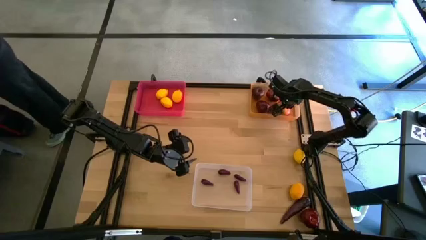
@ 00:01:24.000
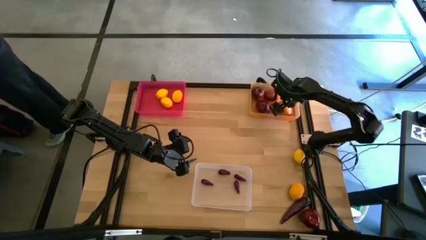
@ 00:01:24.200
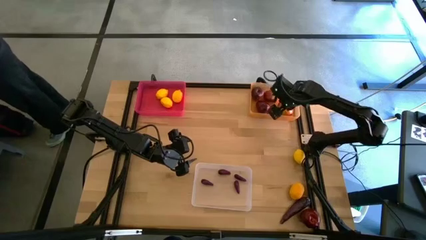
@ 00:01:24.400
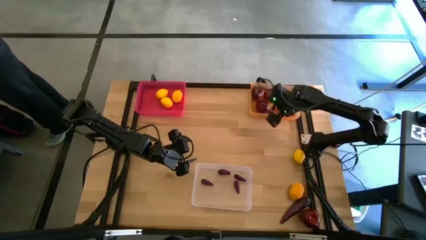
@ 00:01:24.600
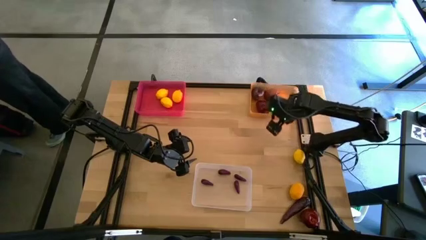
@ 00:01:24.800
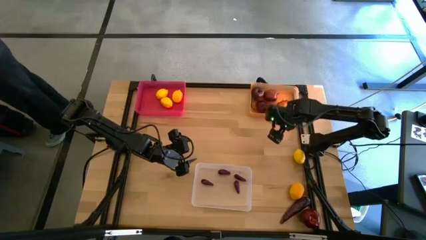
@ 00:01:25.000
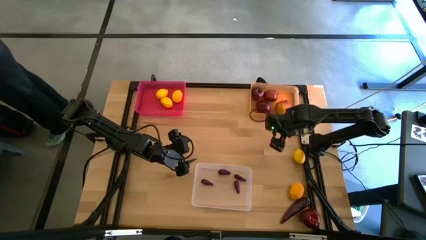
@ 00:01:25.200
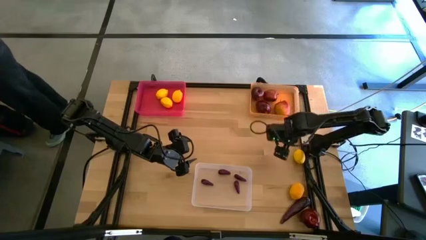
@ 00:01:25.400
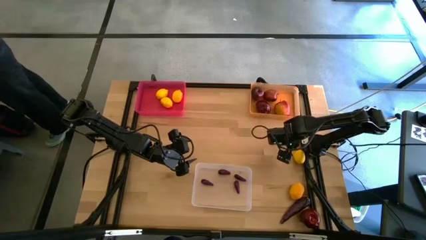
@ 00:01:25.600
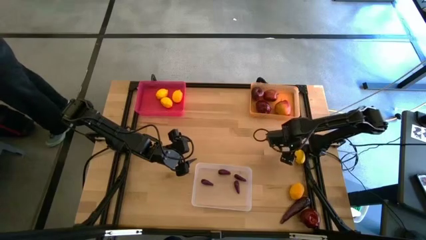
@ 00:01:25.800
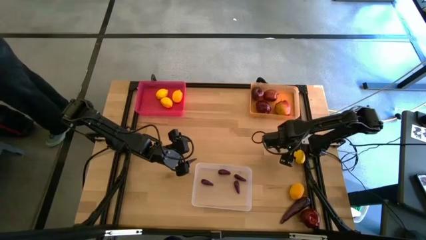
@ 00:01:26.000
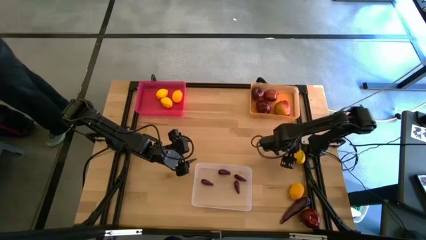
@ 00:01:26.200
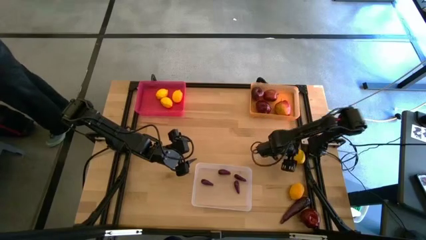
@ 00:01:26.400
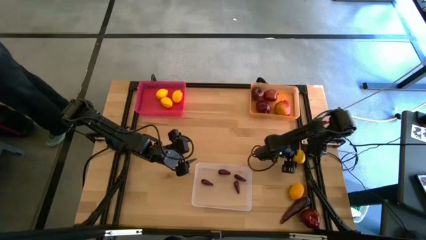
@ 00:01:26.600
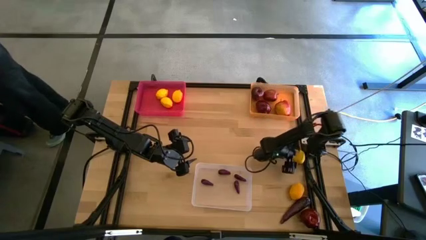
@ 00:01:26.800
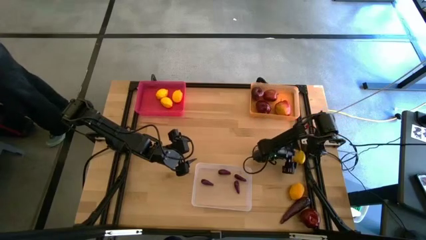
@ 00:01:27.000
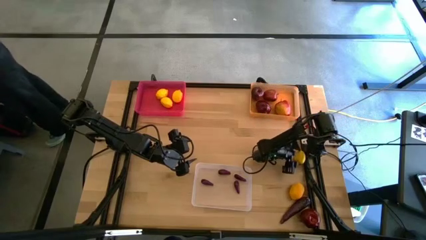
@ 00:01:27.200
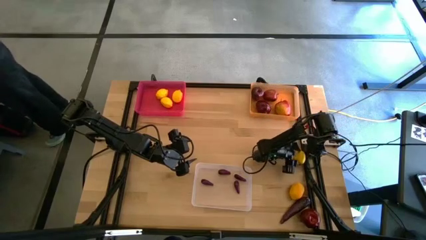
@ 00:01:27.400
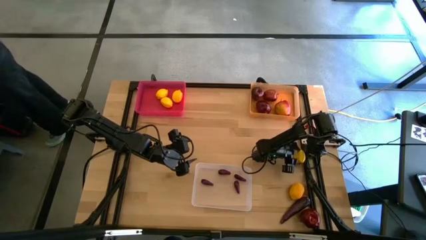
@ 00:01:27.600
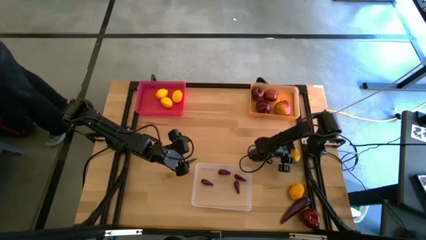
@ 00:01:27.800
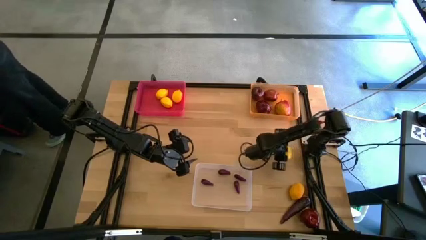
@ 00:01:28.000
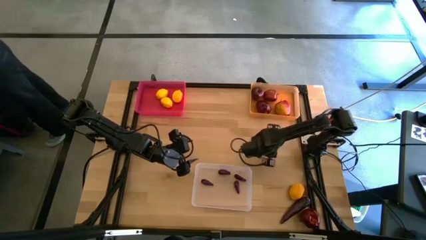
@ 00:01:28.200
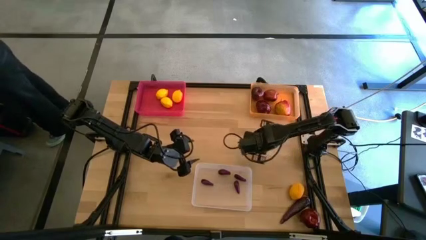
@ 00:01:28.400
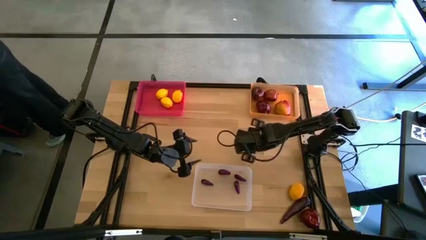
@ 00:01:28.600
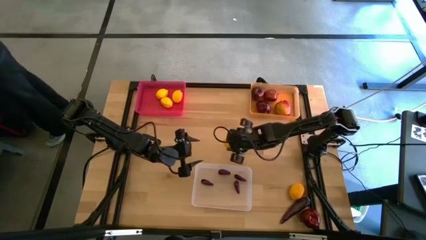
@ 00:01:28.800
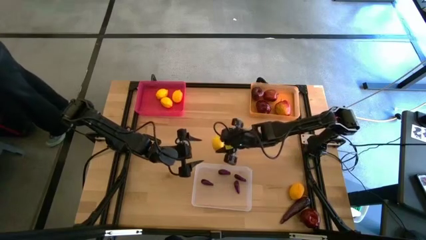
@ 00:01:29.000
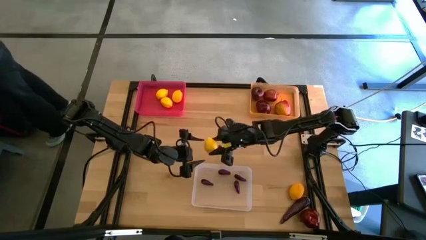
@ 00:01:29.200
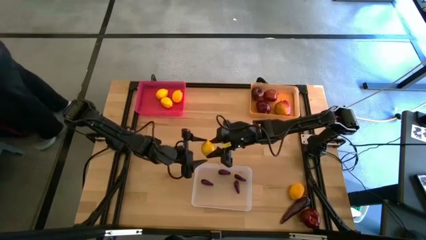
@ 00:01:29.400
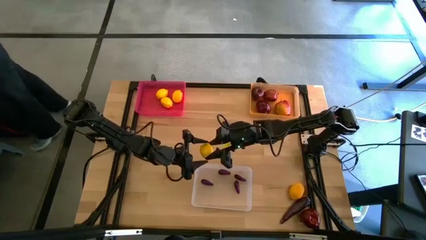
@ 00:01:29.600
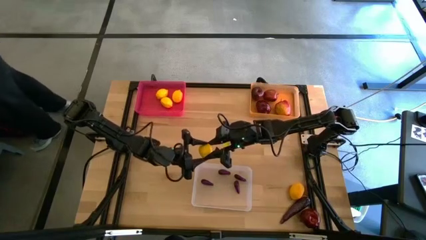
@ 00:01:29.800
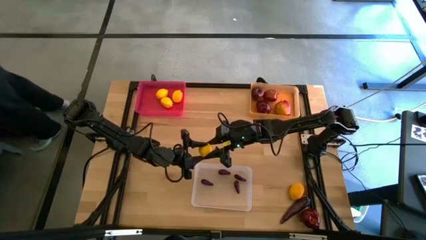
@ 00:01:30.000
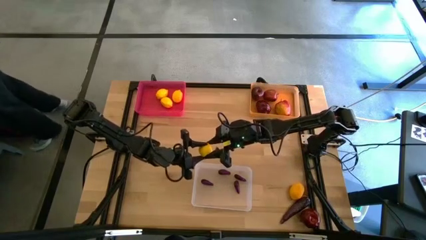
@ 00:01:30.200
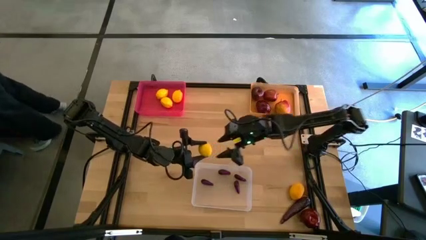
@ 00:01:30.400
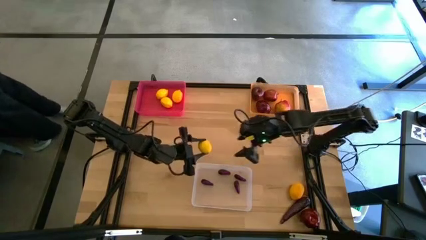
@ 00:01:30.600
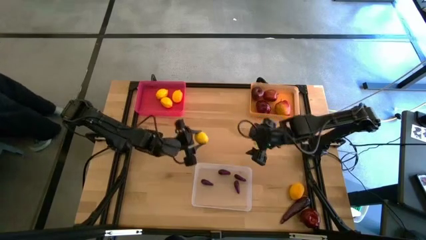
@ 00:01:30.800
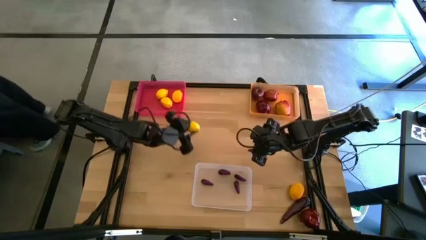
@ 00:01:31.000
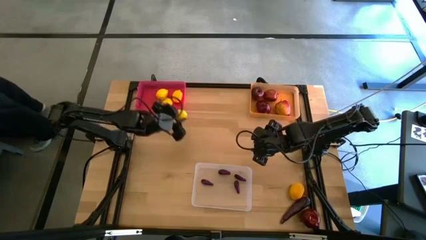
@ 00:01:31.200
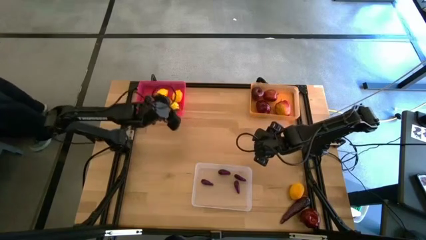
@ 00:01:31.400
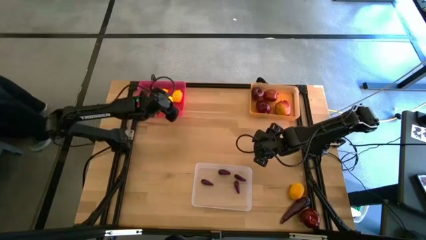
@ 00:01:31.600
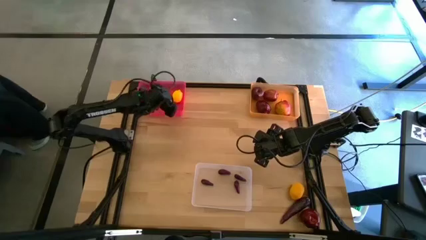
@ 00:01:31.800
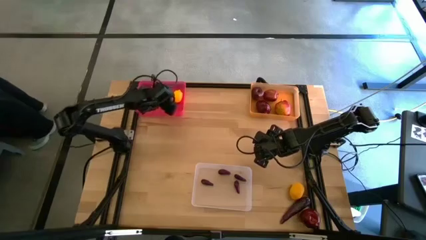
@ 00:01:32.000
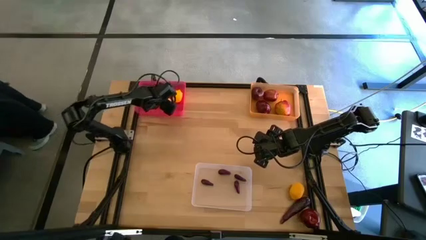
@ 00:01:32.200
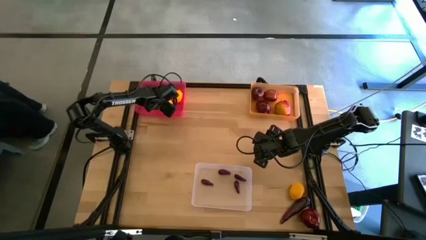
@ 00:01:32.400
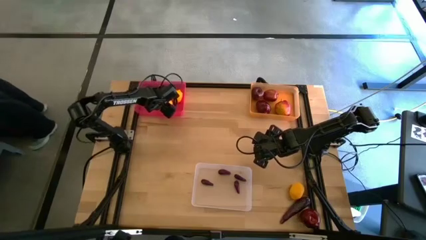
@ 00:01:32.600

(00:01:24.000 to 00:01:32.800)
Task: Sort produce into baskets
Put the lemon into the red bin

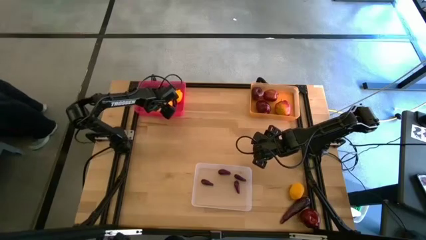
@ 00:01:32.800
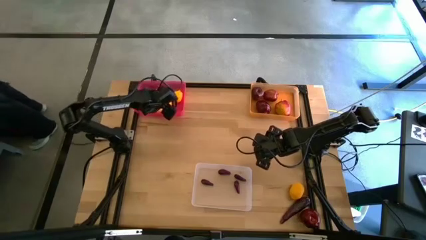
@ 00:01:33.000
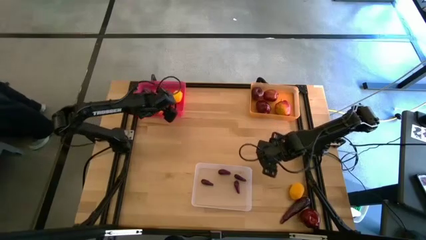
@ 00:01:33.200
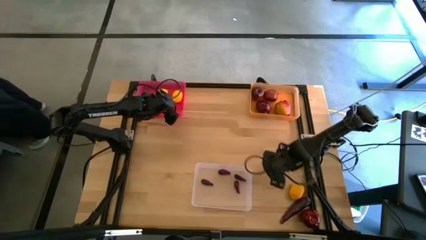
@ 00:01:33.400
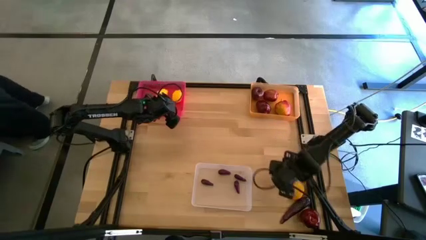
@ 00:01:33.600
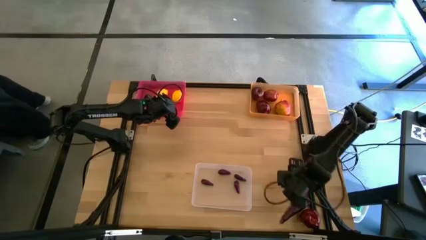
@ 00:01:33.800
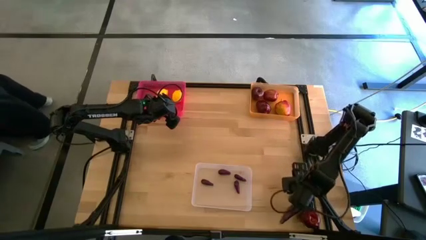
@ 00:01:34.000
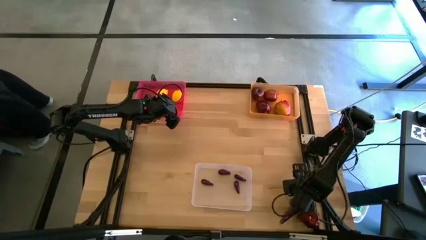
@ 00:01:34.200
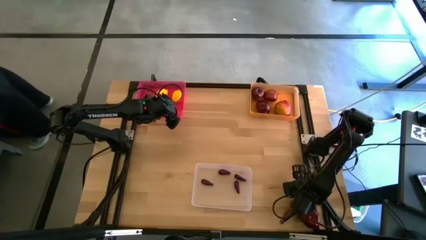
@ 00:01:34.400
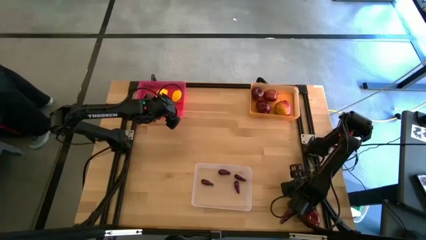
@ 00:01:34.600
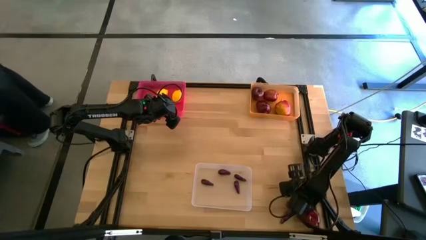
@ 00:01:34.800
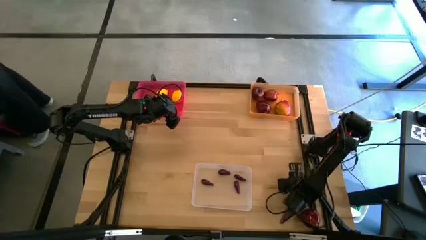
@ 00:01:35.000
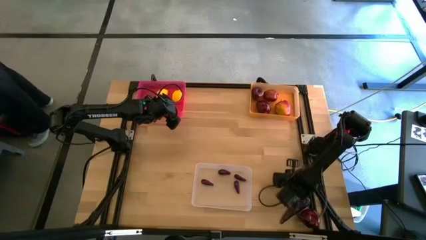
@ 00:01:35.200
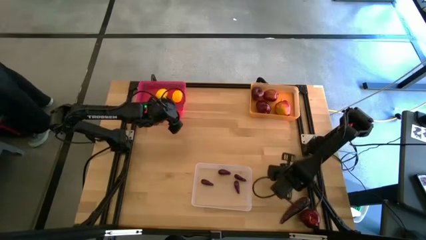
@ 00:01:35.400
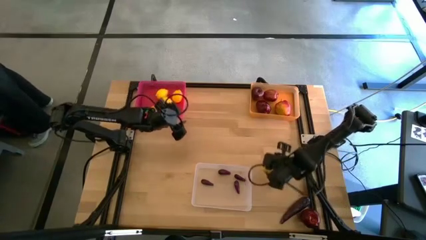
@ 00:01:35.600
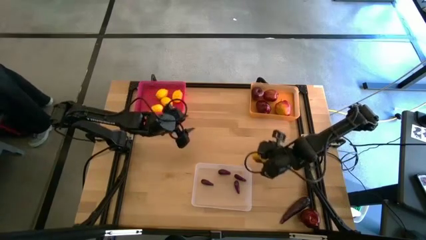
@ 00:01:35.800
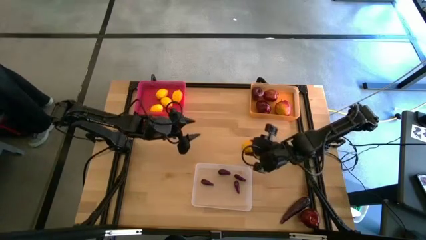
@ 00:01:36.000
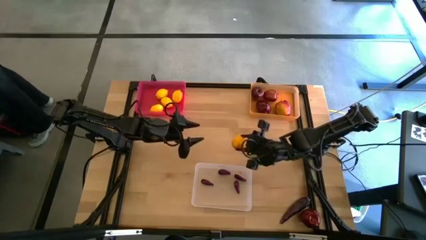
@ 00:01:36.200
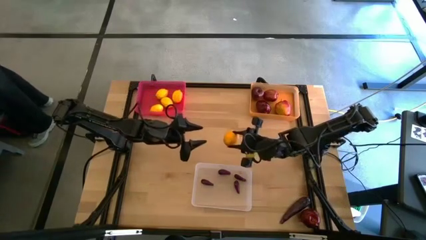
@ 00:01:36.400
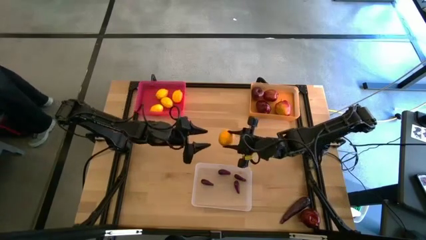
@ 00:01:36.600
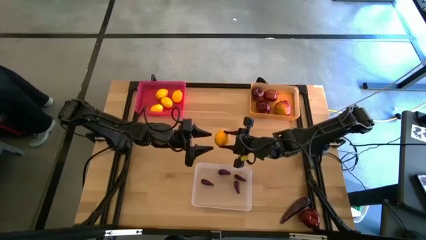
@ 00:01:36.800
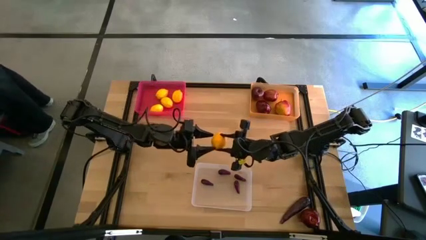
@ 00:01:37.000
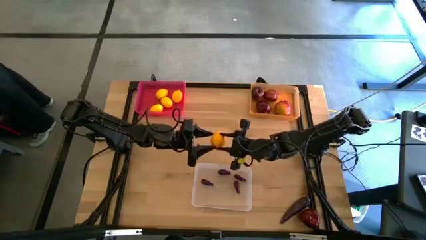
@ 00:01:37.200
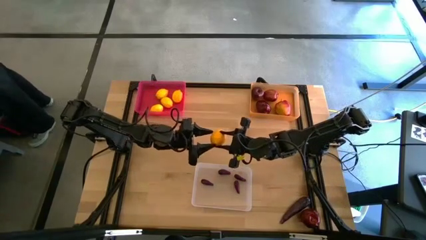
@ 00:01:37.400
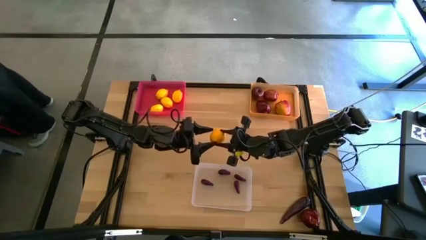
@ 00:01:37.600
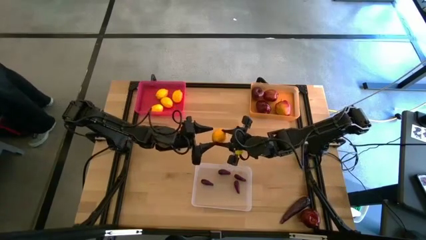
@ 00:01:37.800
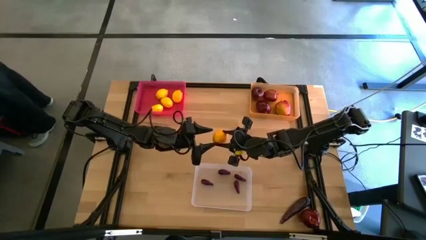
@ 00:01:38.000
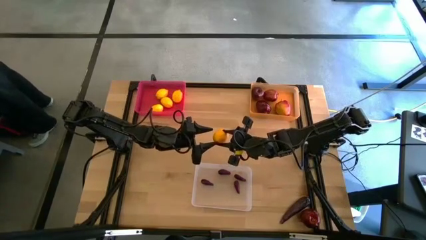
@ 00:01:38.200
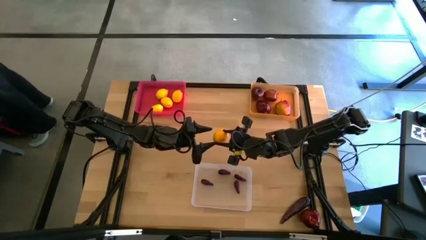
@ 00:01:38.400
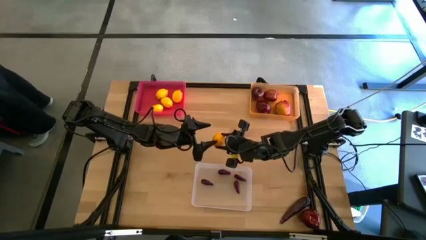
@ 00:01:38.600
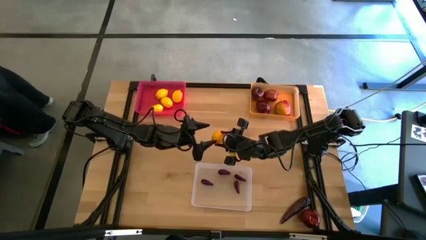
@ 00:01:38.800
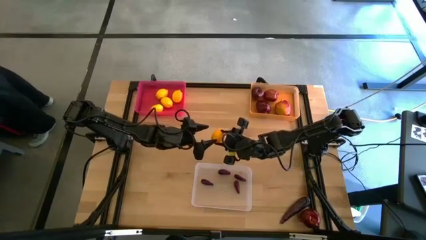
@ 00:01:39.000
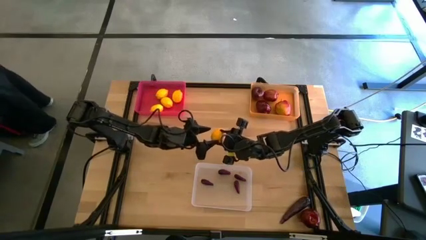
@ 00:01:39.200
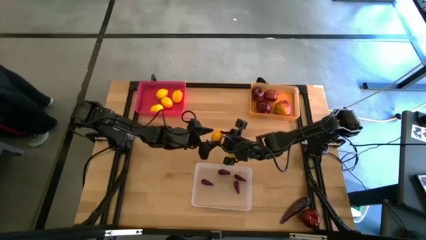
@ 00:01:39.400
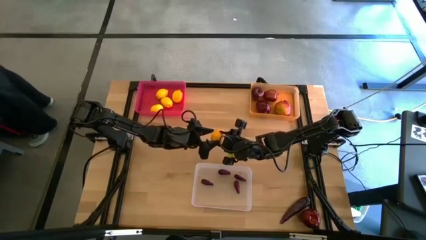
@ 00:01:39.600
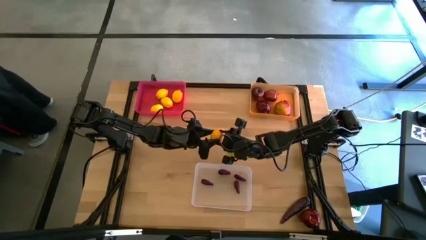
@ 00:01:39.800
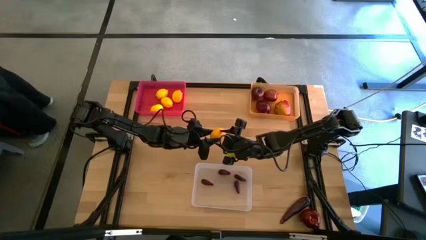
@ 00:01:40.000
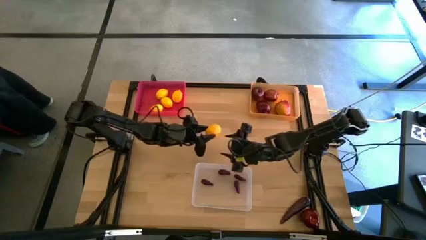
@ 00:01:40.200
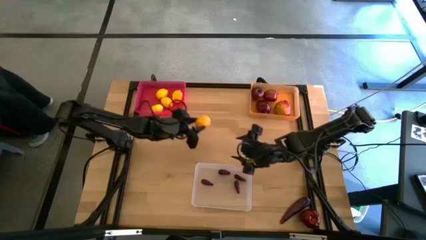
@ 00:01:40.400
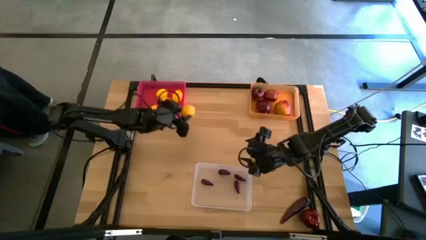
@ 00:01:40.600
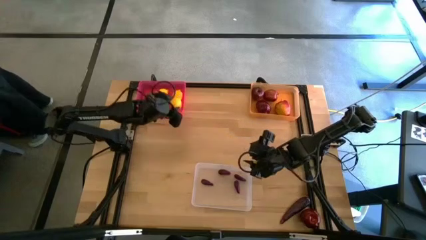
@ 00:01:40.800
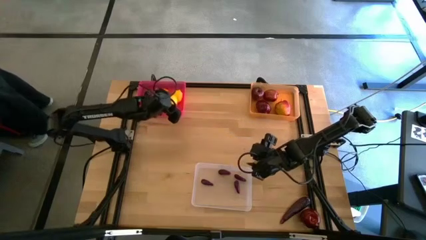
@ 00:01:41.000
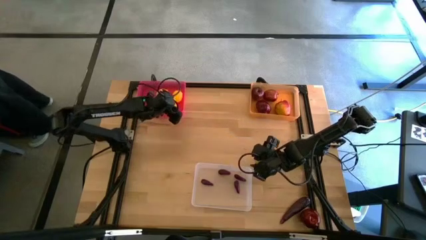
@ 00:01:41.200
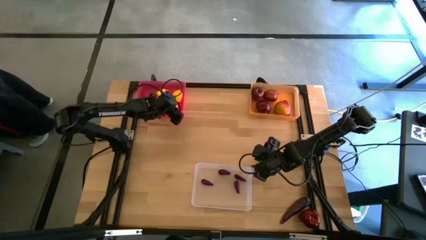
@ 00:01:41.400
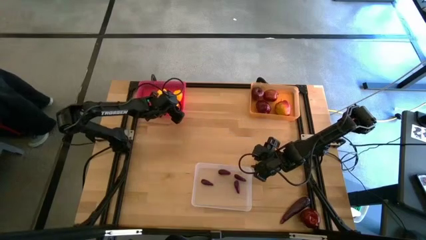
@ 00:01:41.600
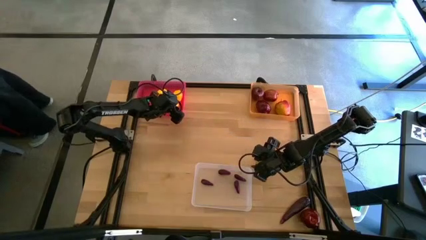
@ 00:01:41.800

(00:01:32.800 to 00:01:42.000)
Put the lemon into the red bin
